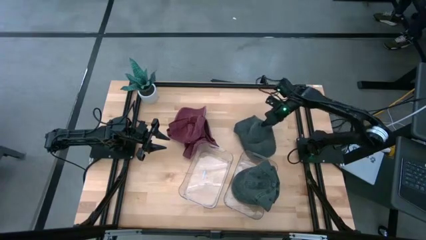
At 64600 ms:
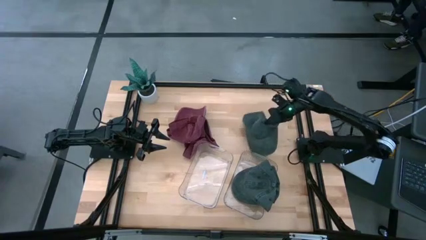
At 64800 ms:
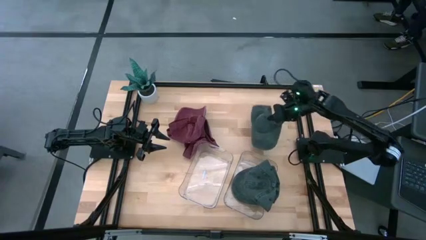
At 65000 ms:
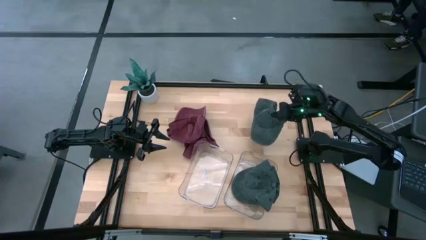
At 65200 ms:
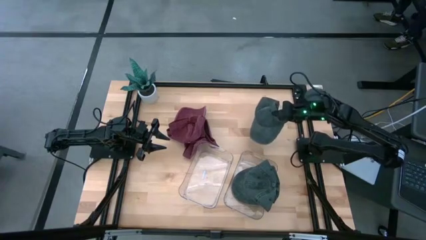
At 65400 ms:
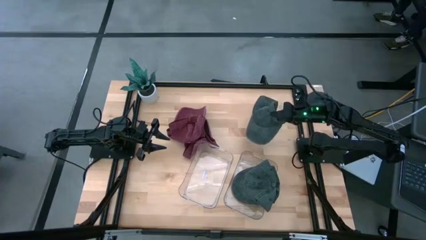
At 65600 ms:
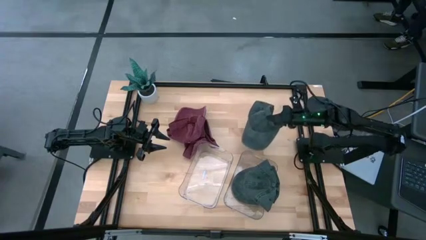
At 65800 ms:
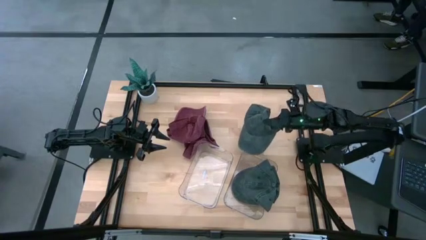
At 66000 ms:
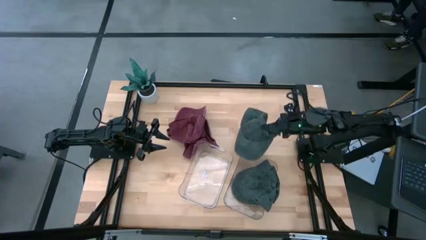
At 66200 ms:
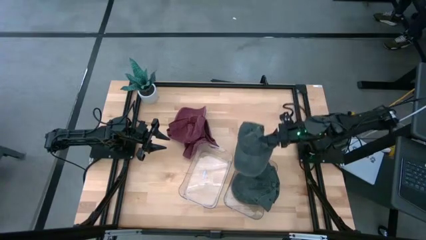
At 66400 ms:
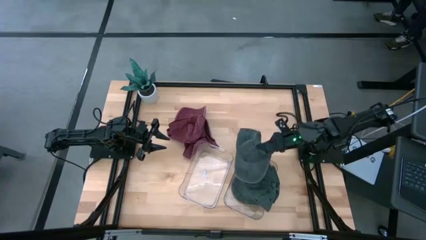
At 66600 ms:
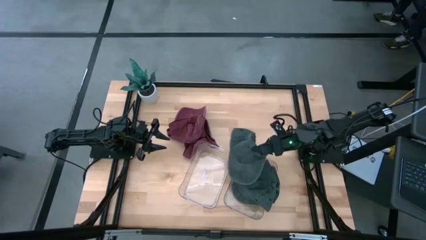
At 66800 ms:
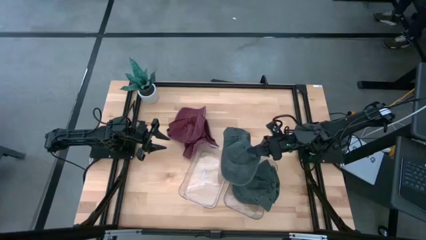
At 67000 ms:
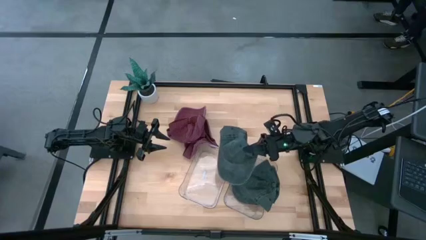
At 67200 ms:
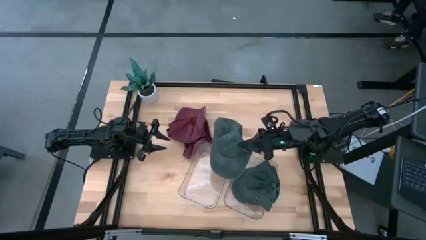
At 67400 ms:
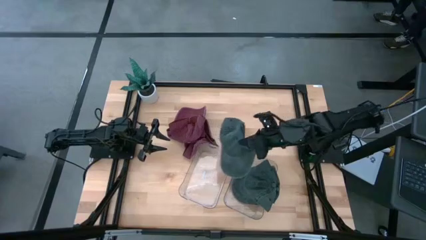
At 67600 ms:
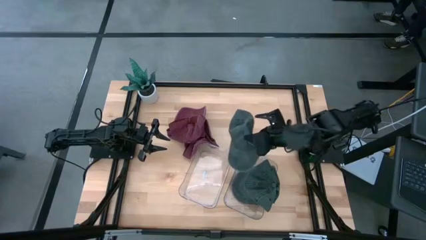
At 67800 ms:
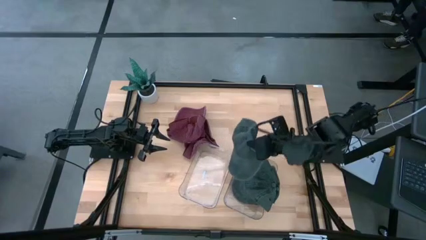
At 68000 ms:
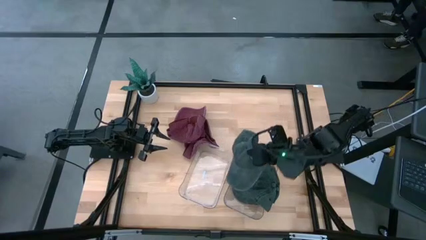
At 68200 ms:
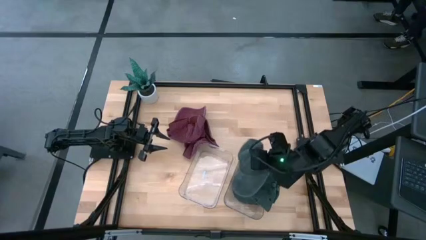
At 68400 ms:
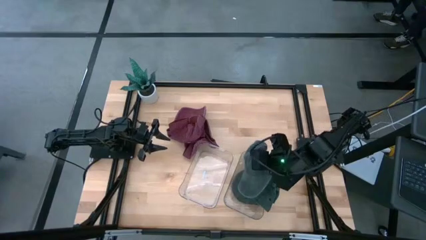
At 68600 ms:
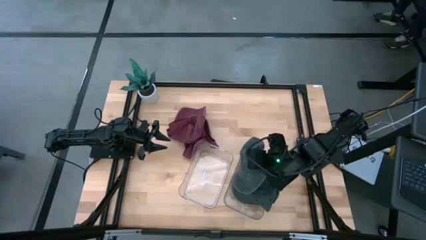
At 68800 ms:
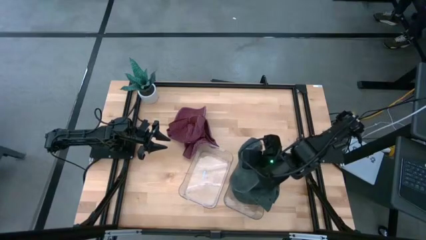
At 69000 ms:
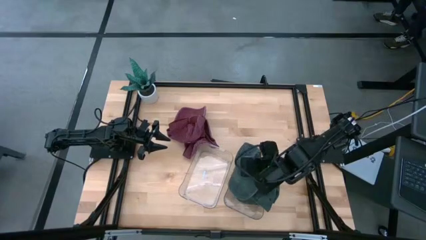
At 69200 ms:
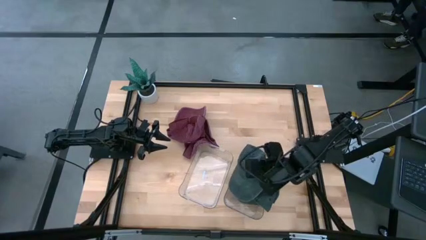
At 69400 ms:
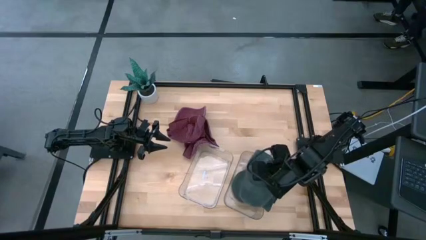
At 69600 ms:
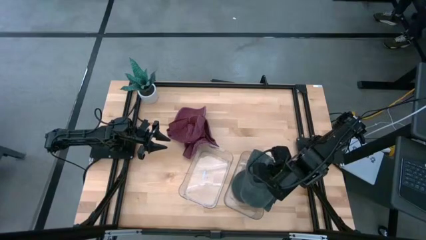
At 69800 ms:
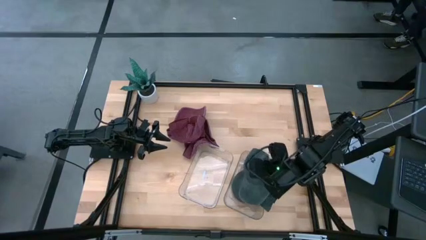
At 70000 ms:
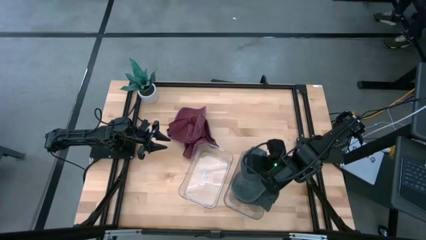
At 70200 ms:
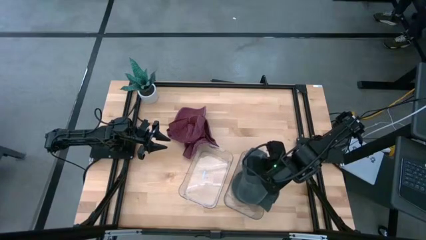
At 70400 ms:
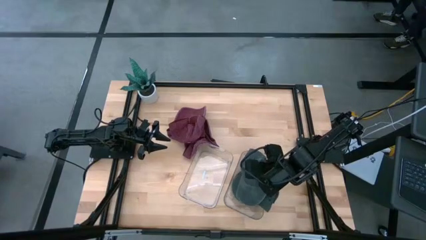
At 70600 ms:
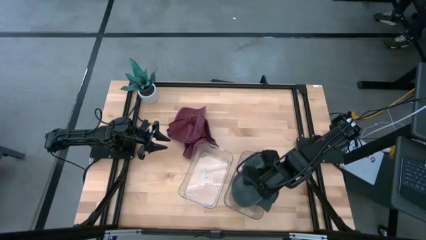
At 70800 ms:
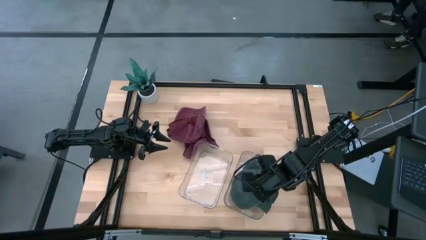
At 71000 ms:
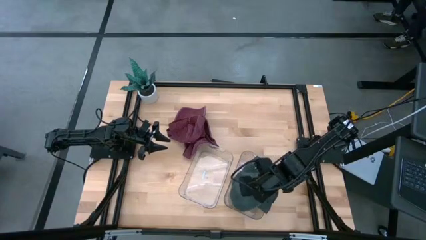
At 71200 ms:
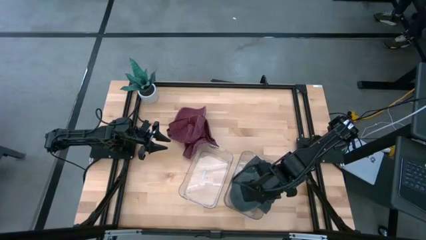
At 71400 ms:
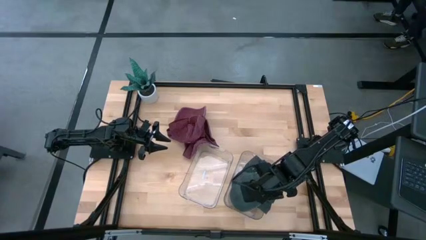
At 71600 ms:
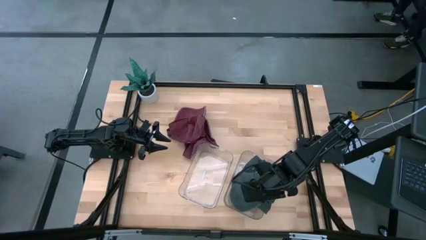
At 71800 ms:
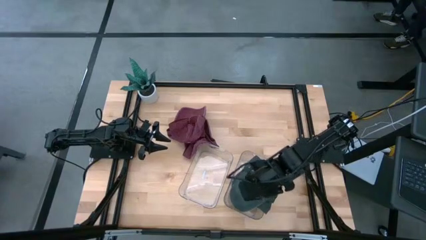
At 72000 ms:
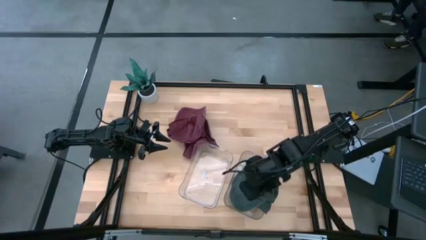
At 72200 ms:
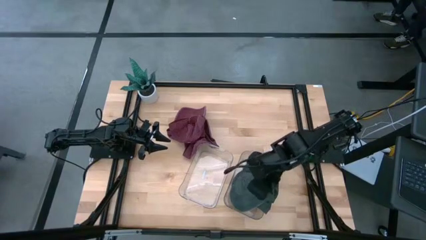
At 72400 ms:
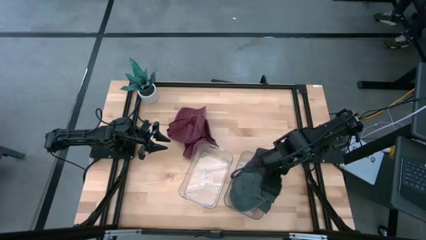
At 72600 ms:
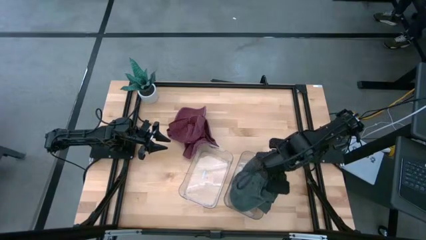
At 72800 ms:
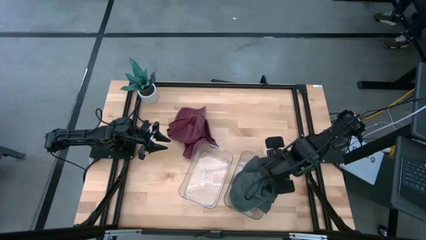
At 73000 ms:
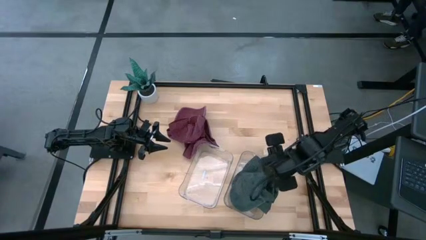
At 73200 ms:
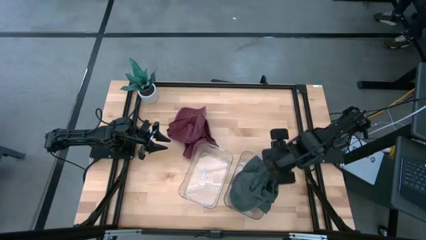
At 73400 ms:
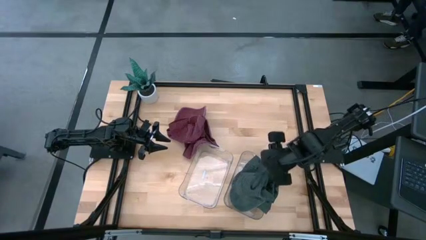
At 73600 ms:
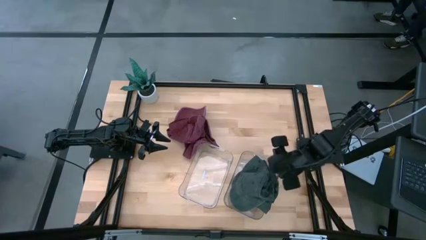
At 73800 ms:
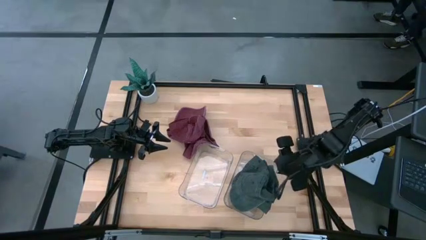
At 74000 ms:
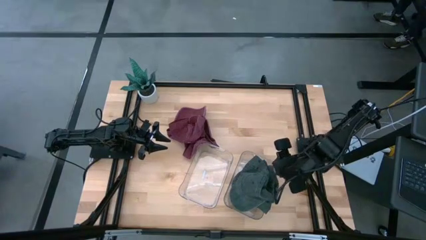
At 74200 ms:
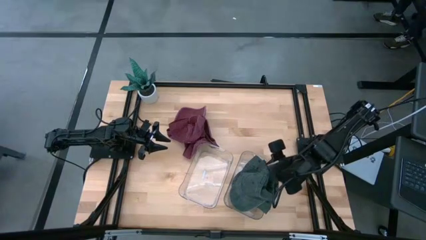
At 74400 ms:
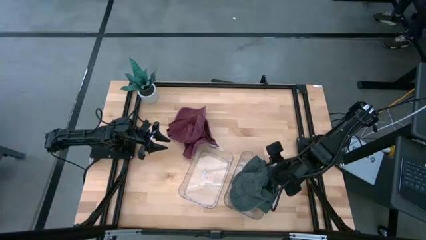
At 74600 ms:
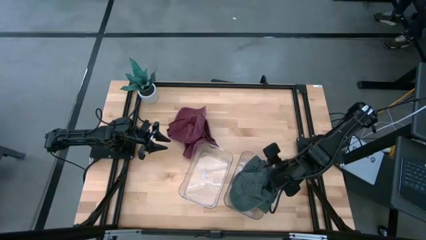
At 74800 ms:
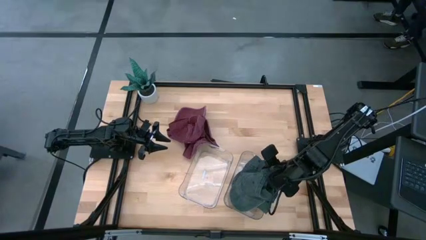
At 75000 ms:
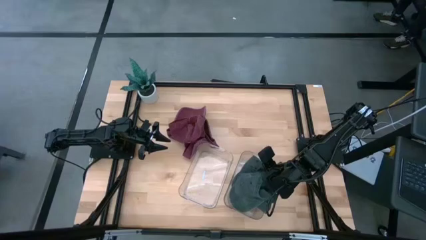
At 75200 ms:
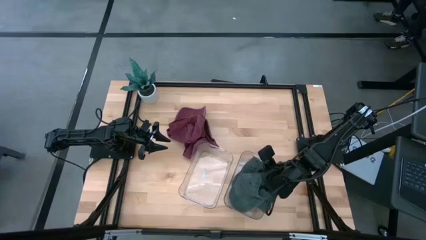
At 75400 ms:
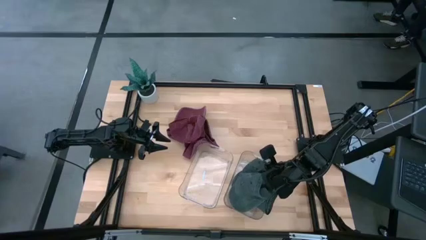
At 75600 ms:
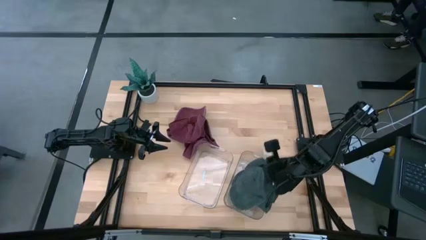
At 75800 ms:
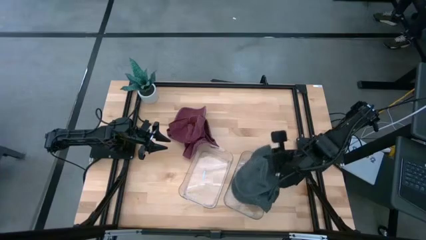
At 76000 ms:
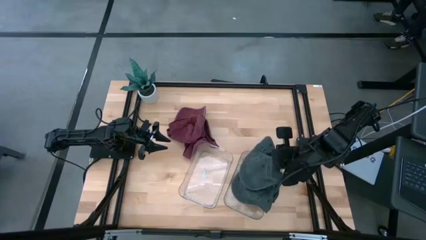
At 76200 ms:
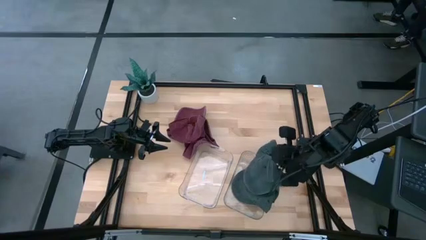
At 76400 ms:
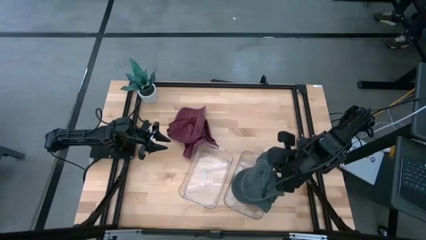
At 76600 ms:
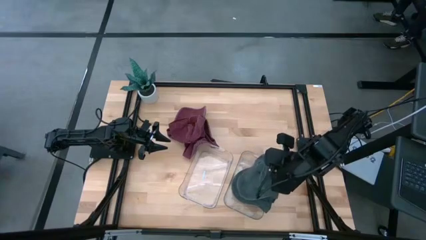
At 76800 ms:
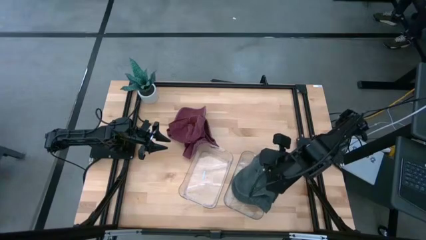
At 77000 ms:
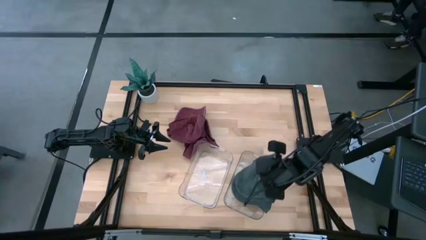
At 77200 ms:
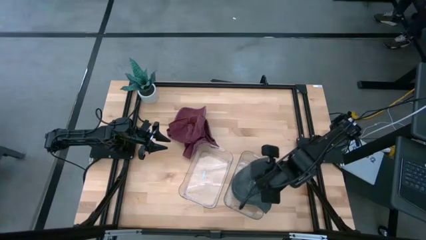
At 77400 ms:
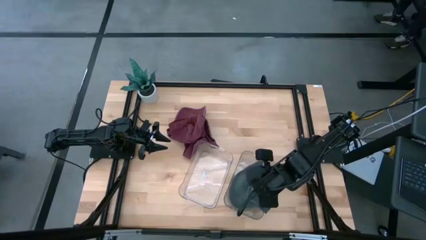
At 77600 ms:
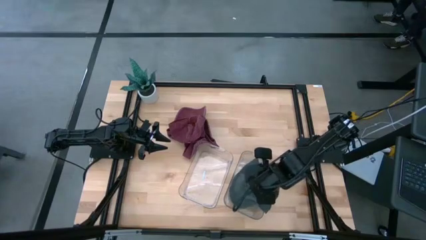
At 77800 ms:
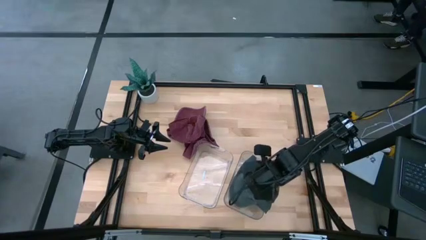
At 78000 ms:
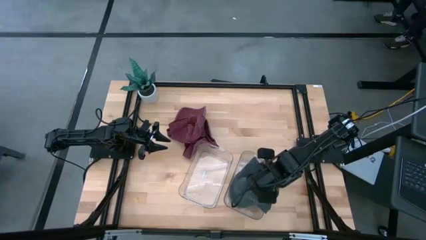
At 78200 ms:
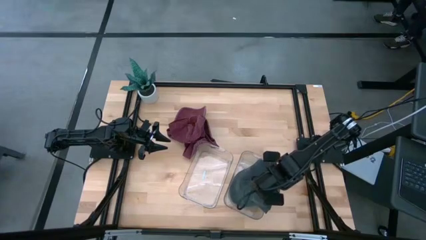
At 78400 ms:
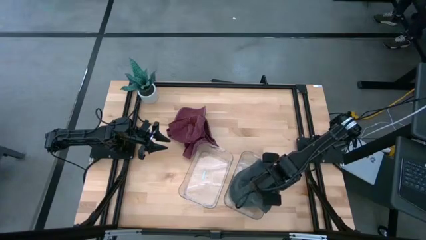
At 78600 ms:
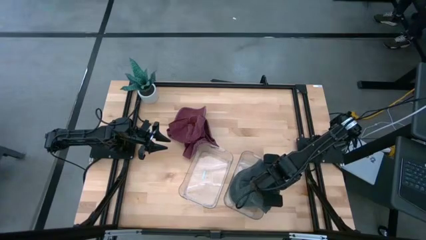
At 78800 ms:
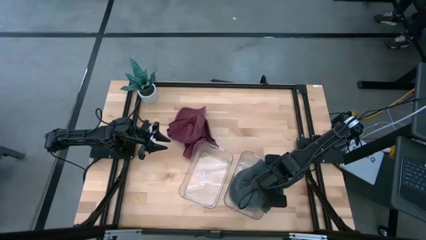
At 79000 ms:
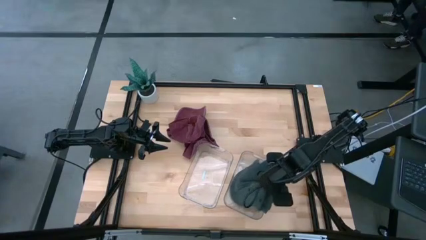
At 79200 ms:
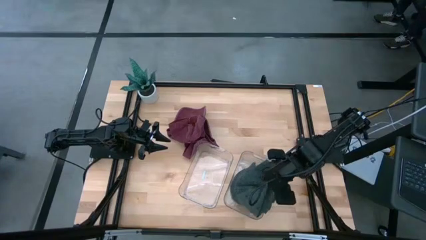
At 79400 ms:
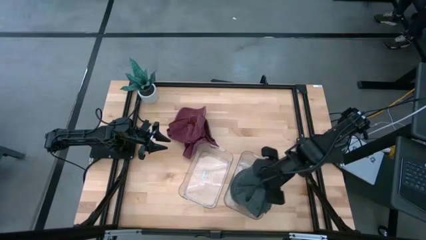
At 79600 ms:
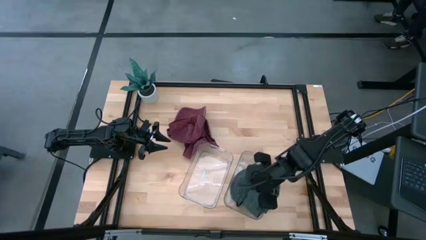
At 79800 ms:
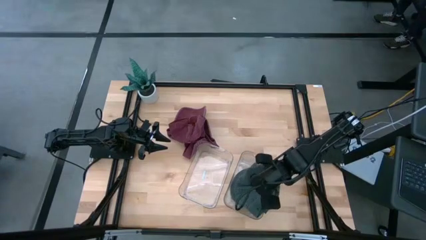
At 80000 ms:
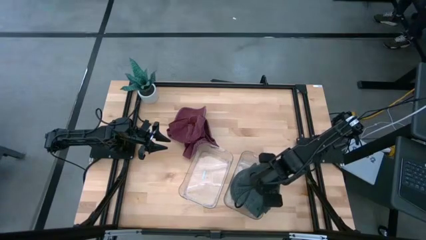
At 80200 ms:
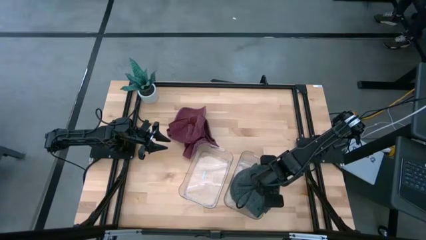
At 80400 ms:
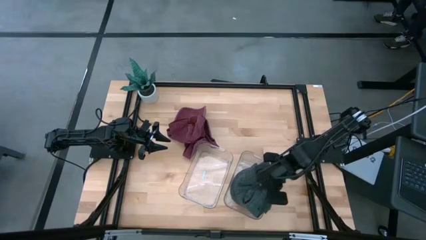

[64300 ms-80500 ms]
Task: Pick & Place hat
Put the gray cap into the right transparent bin
